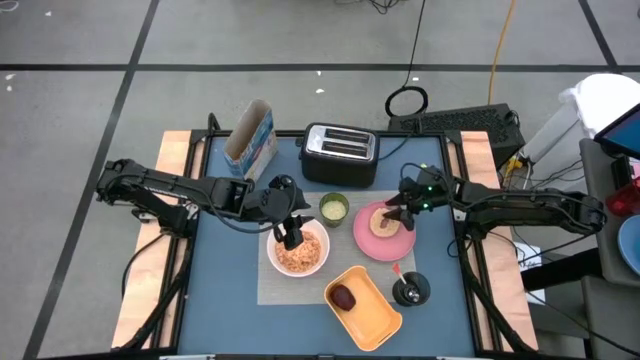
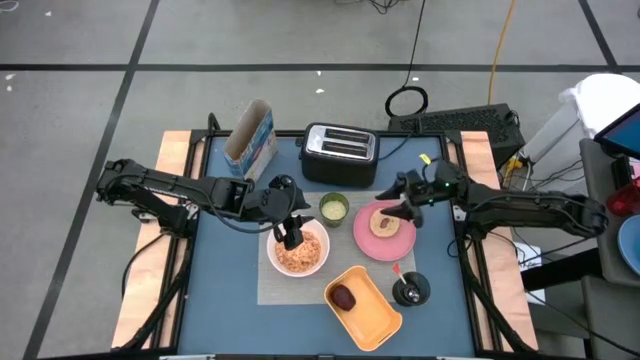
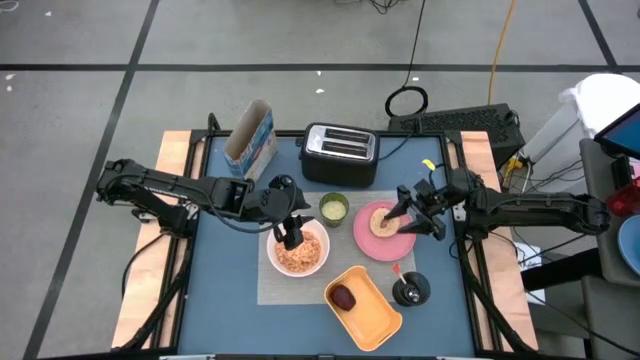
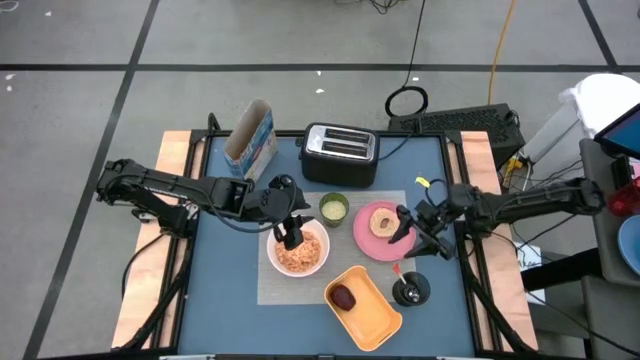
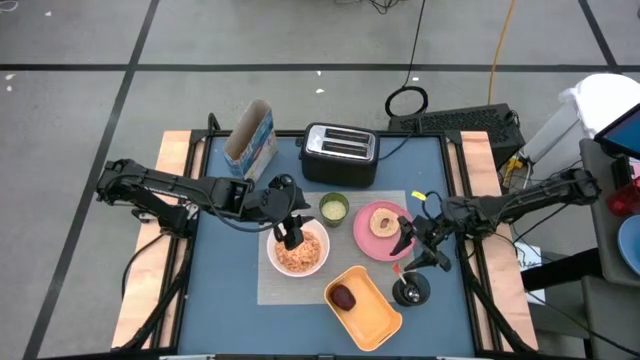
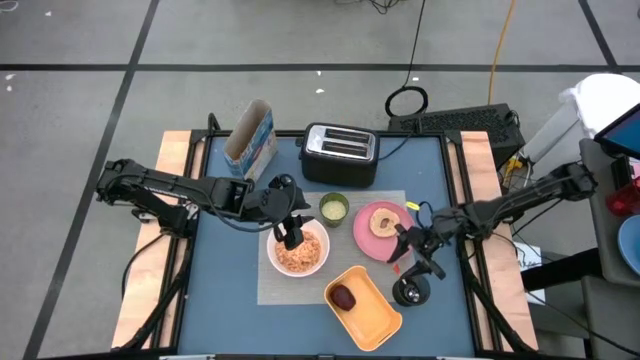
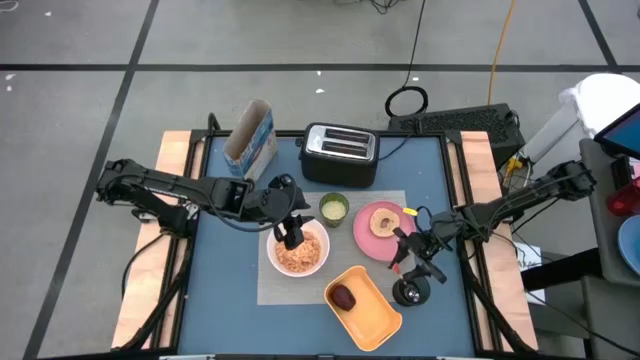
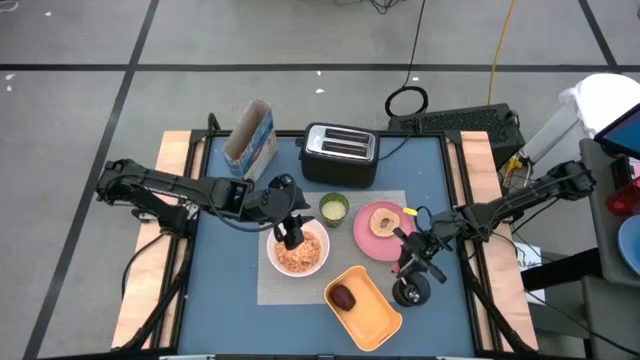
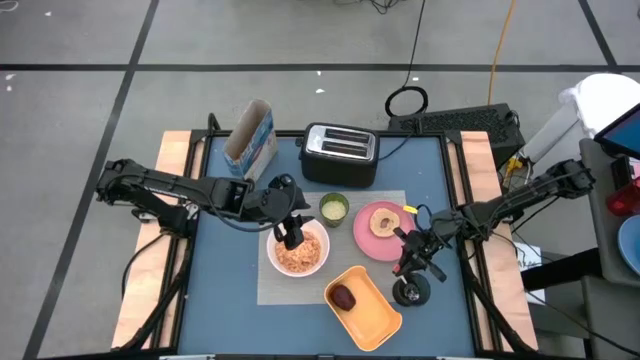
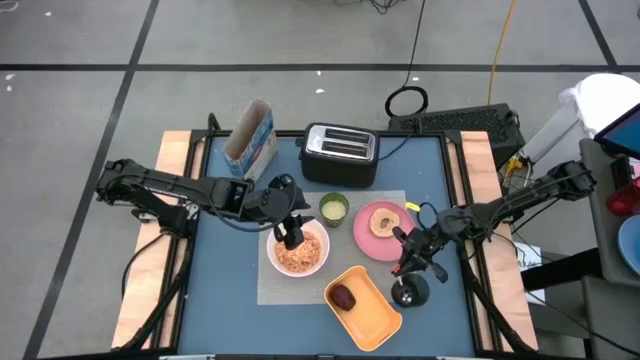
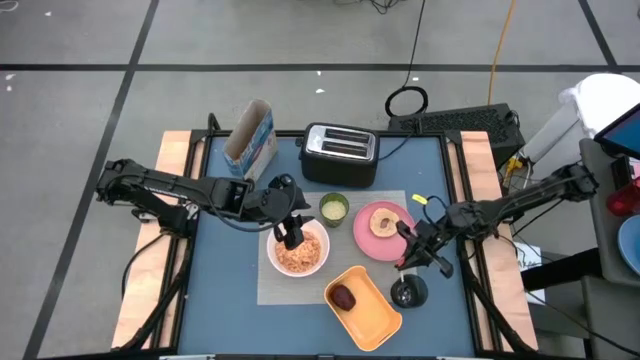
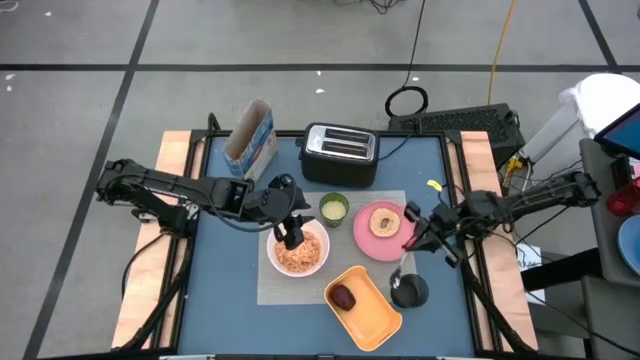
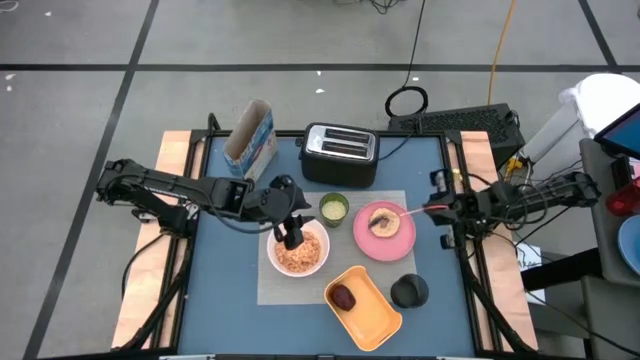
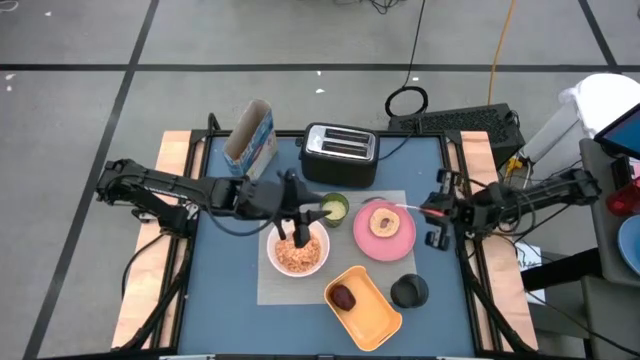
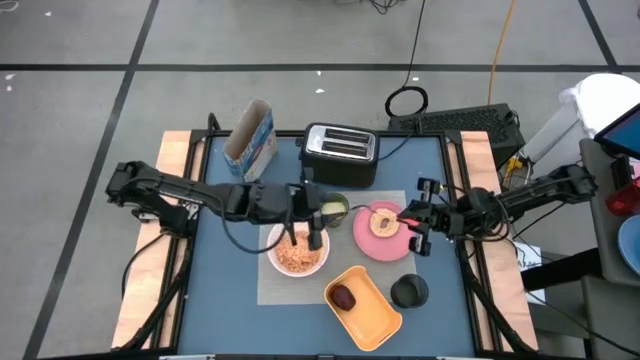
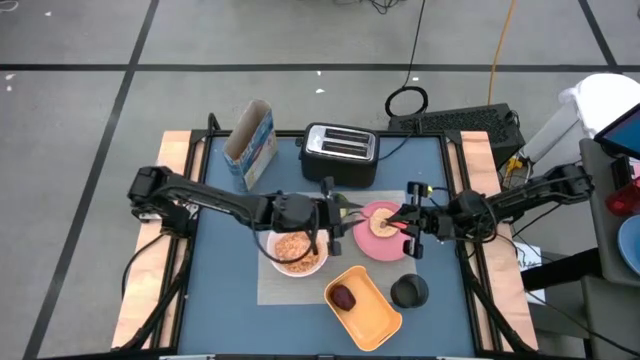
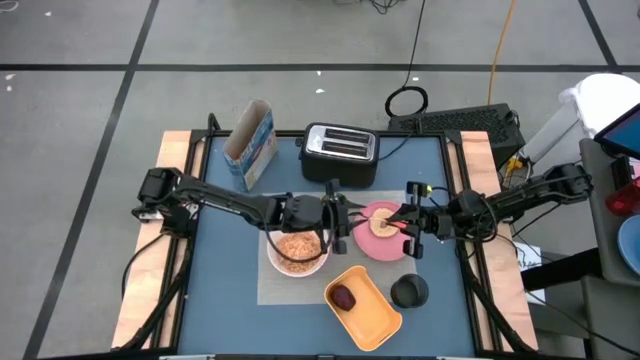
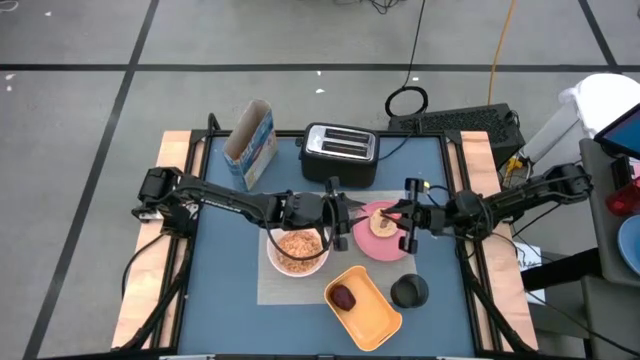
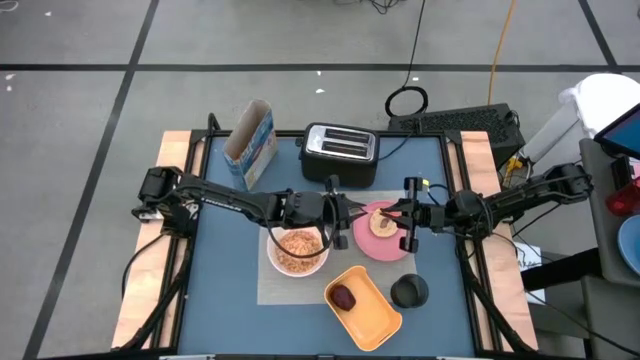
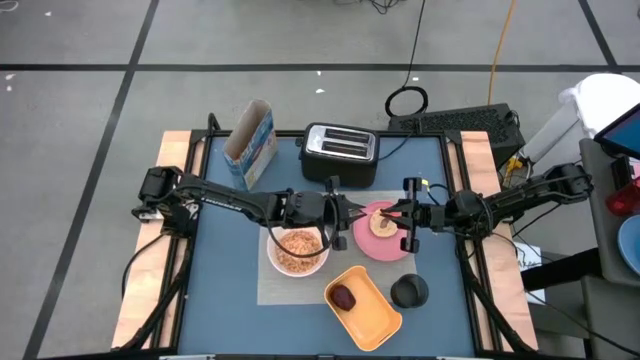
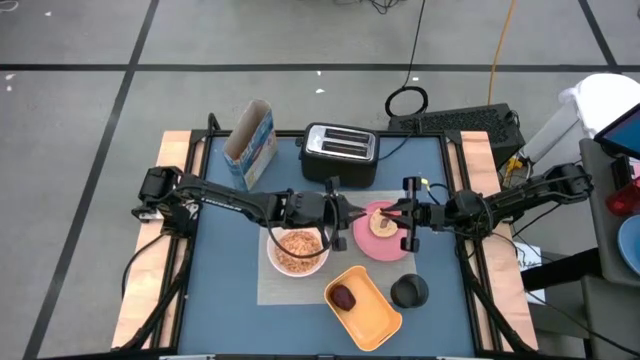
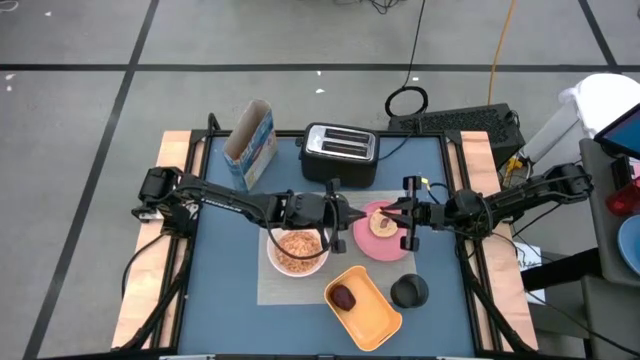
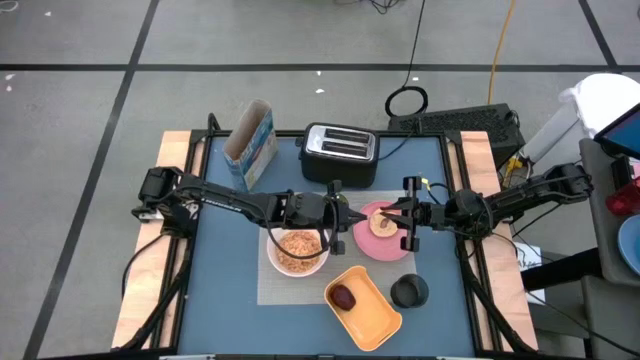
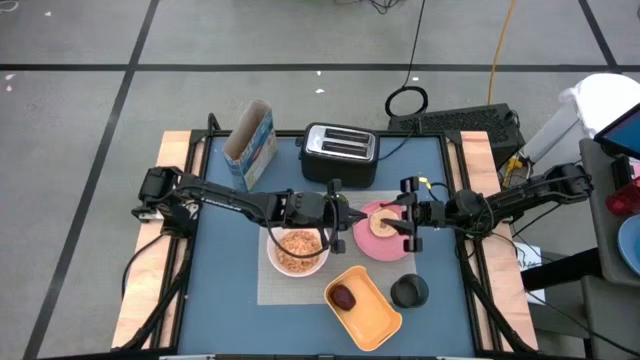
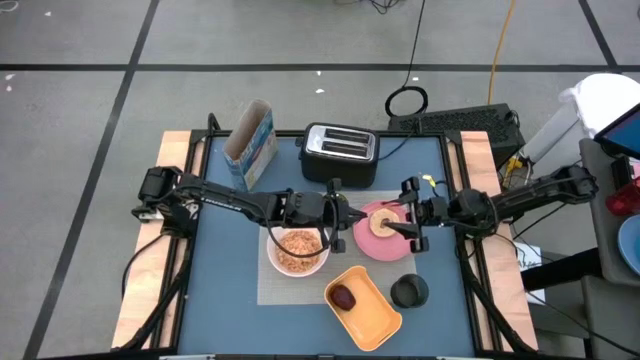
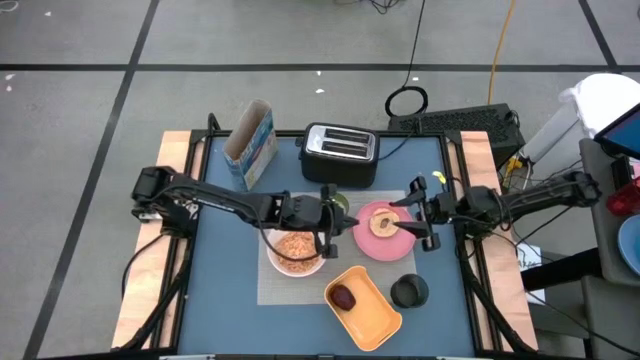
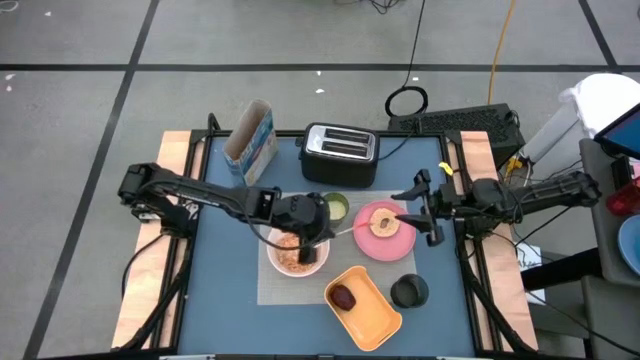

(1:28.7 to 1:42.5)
Task: Arrange a breakfast setting
Put the orange spoon to the right of the pink plate

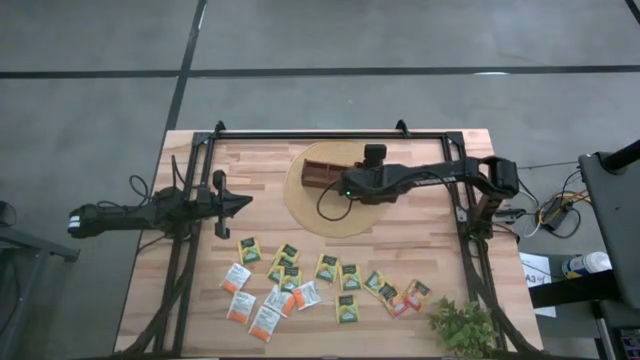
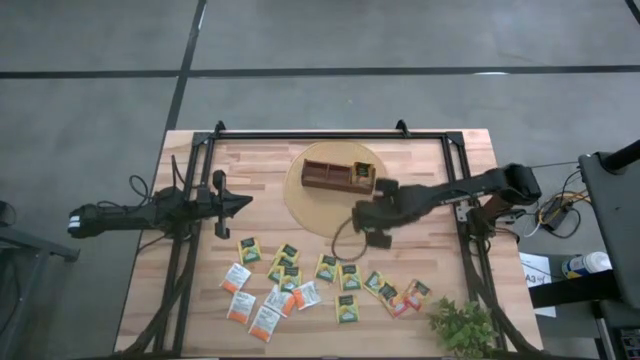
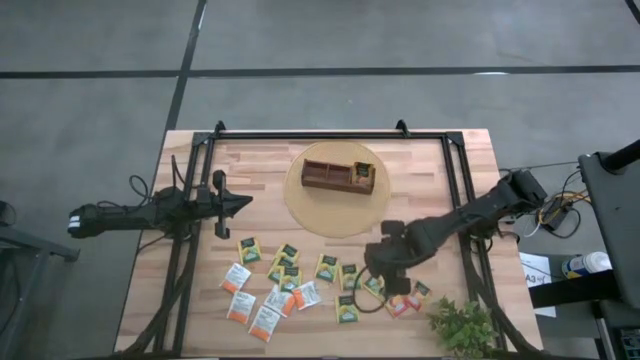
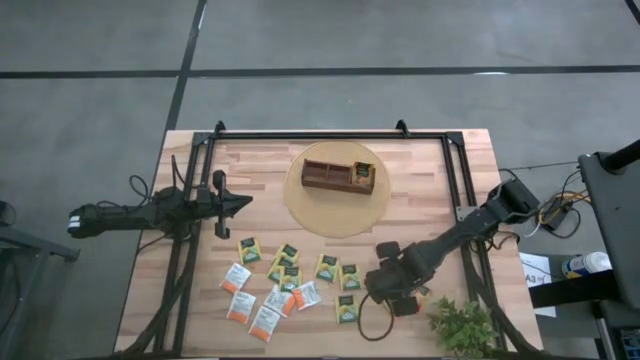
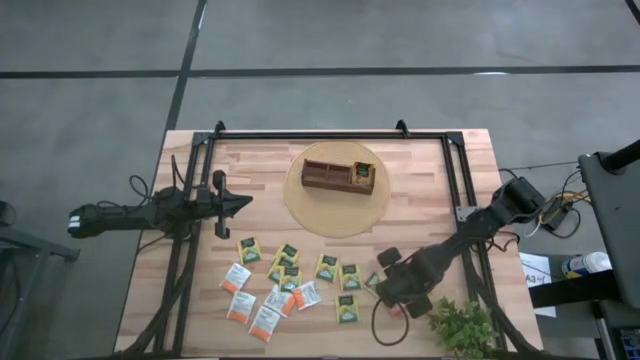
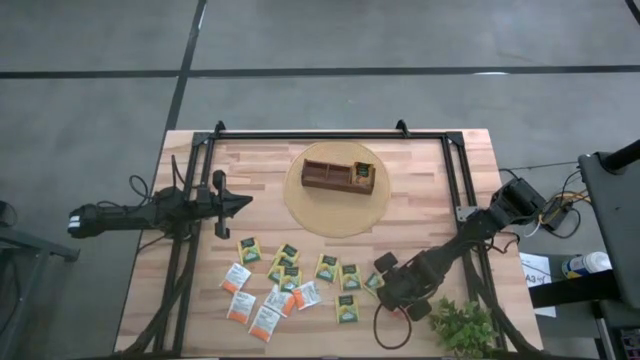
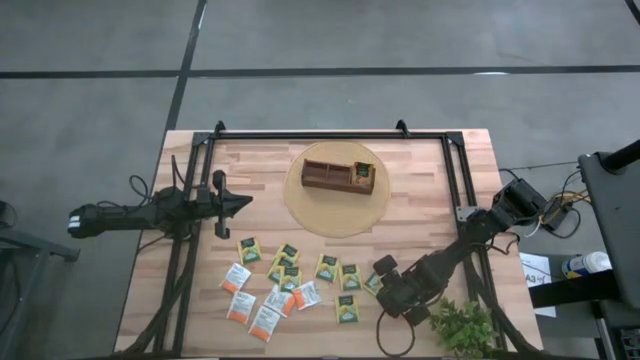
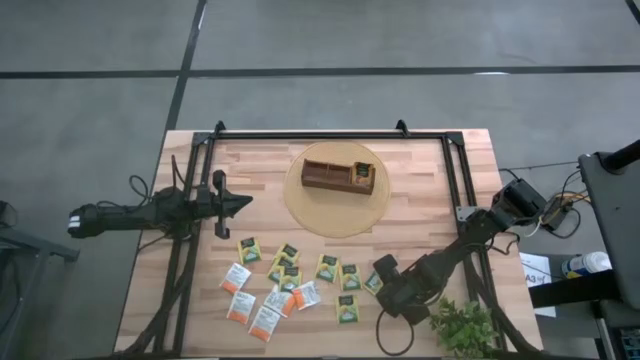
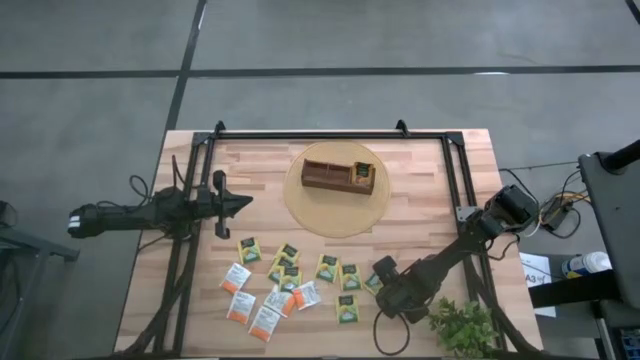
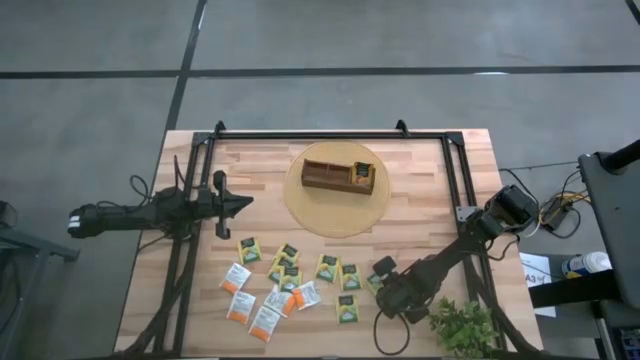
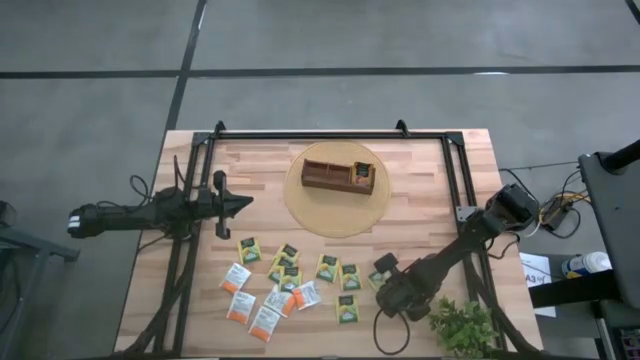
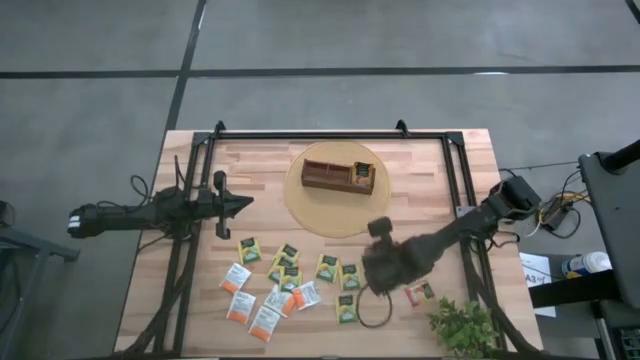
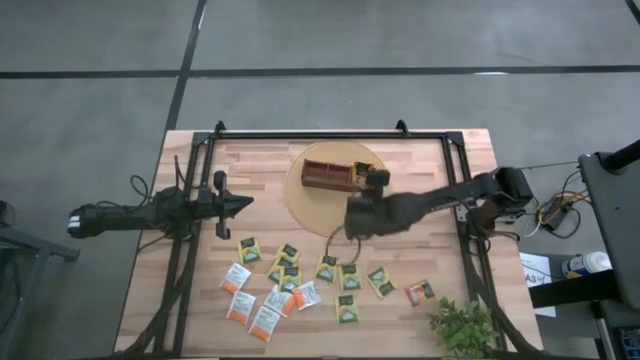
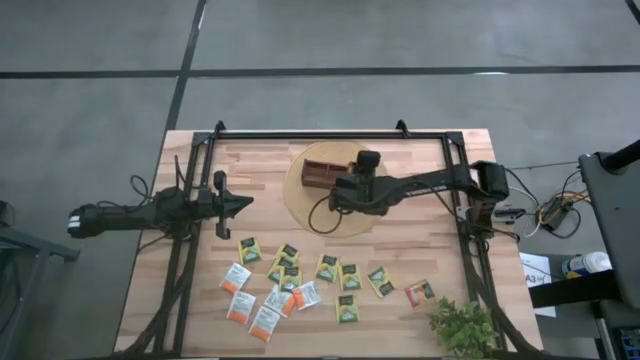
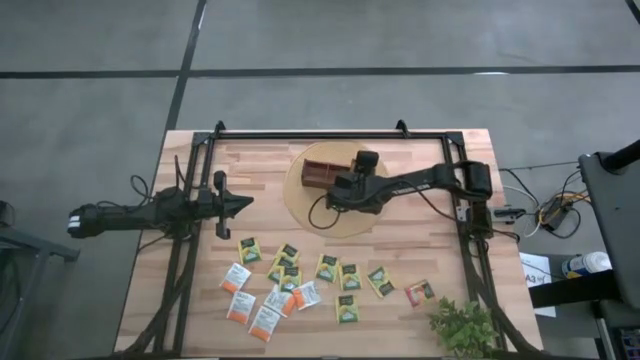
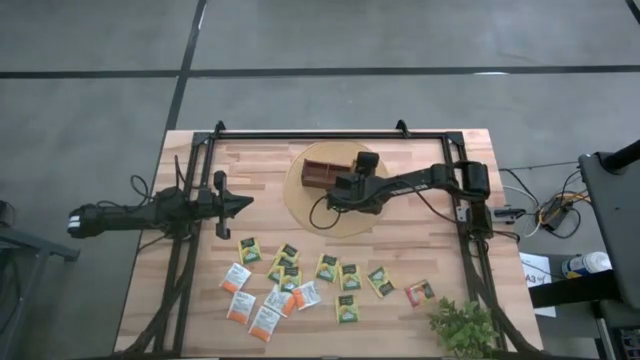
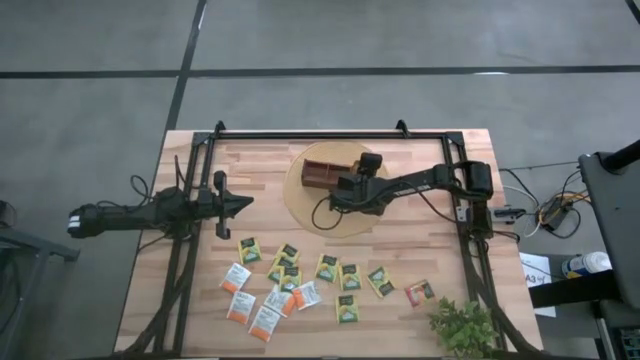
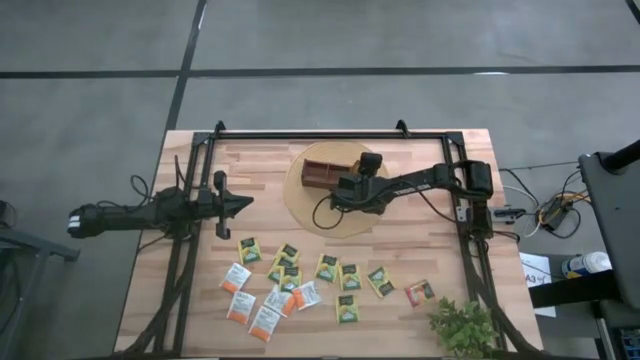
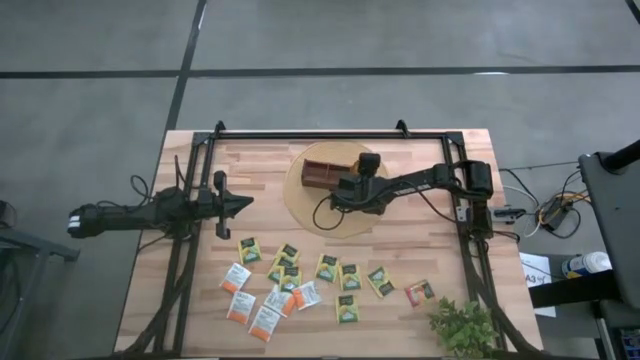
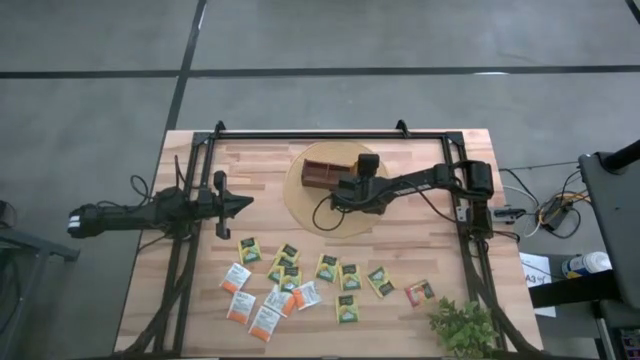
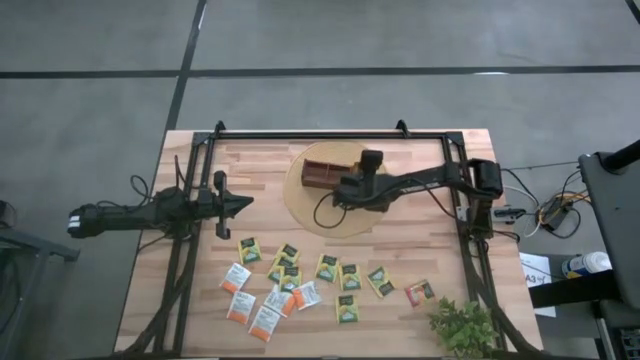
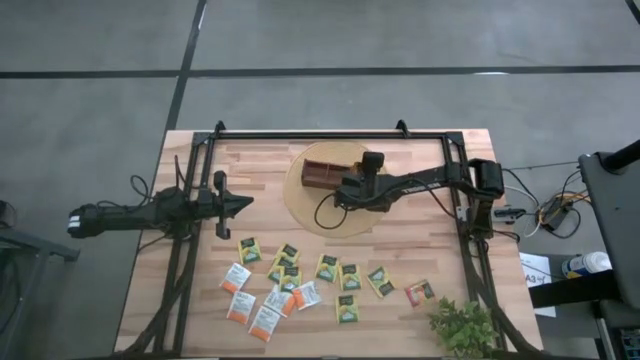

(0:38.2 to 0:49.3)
Task: Pick & Place Tea
Put the left orange tea bag into the right section of wooden organizer
